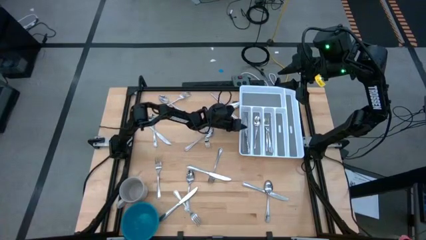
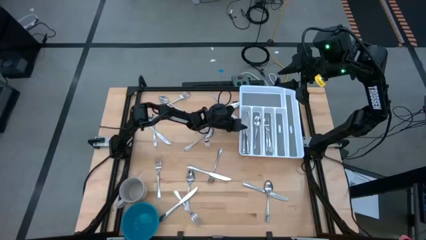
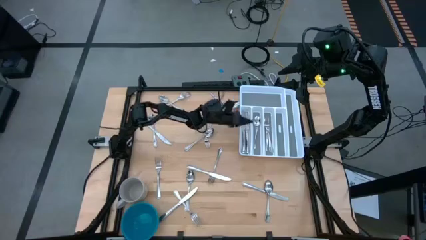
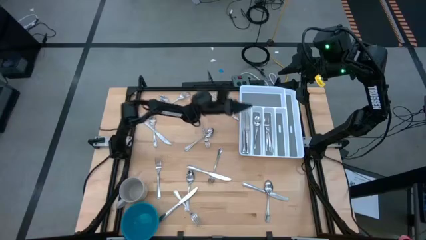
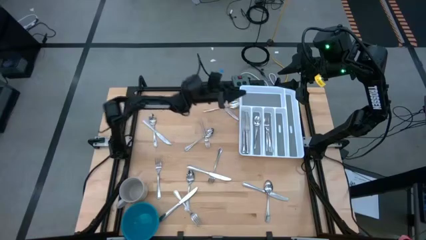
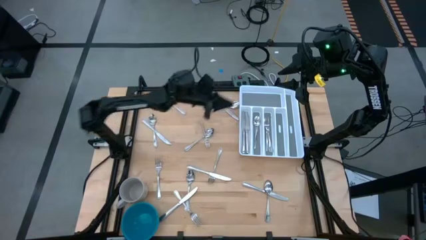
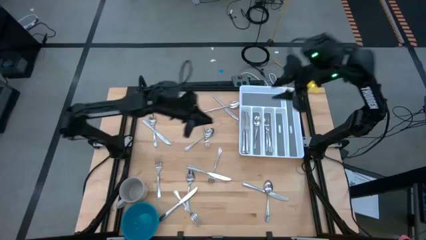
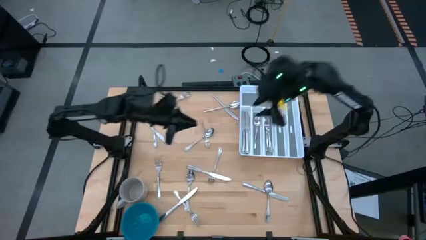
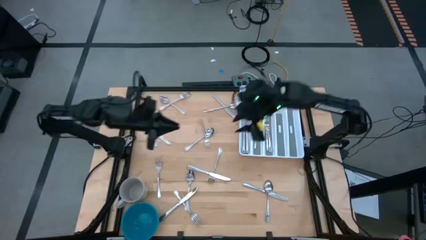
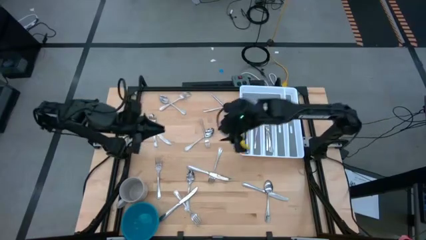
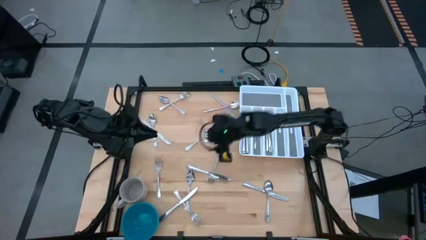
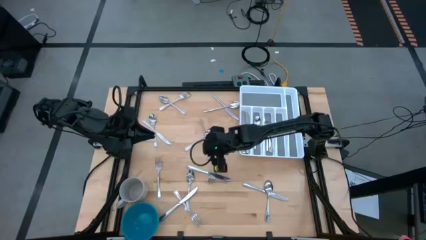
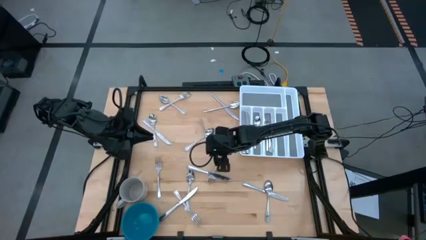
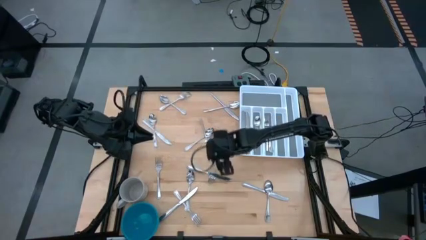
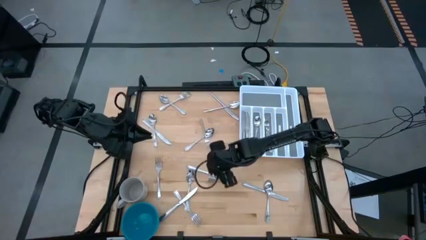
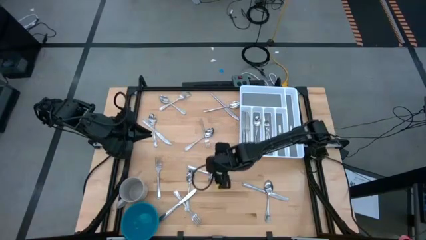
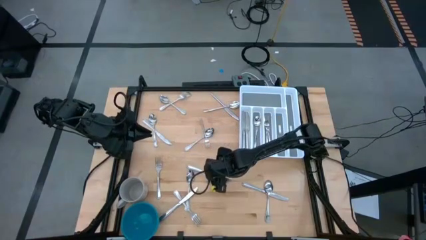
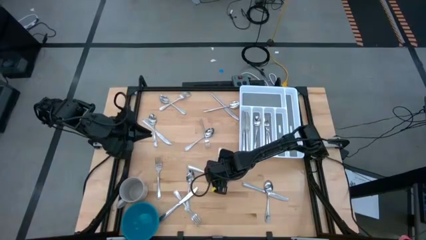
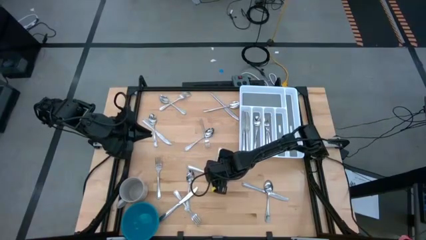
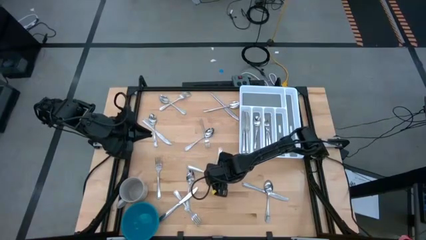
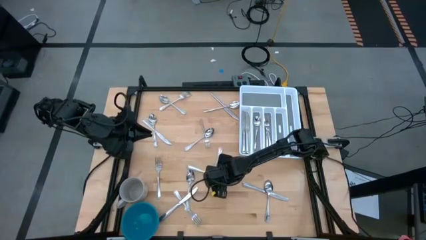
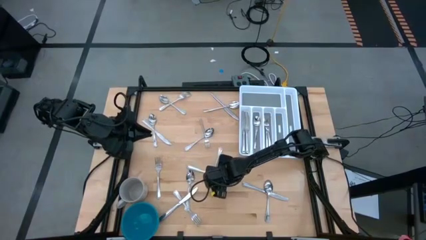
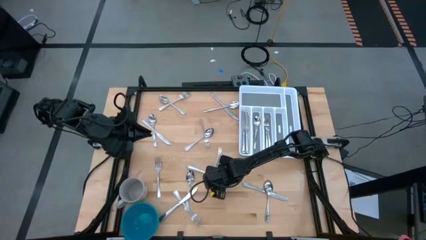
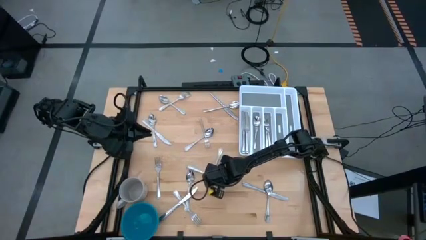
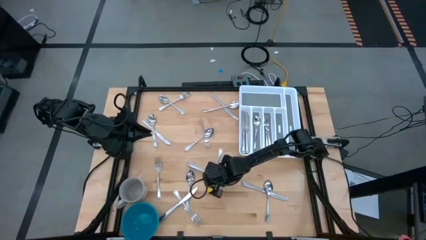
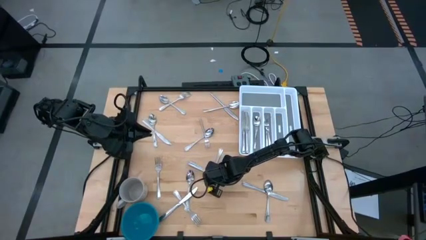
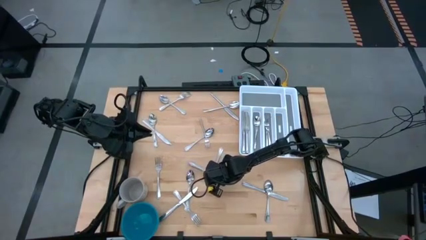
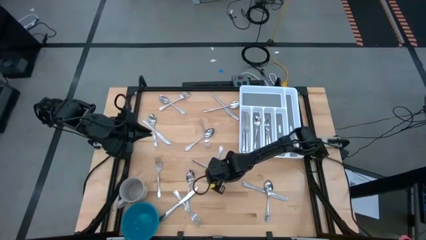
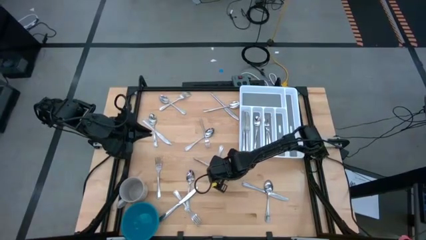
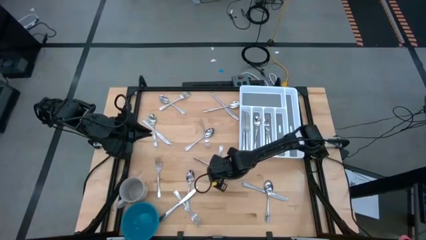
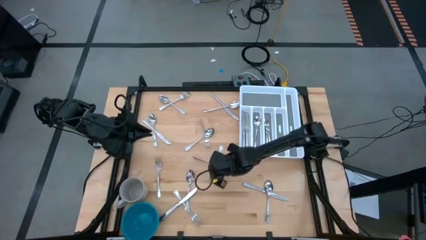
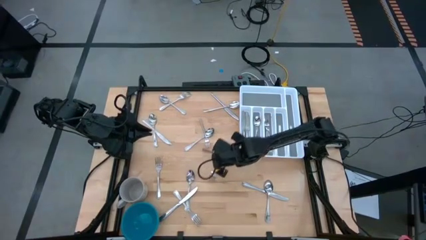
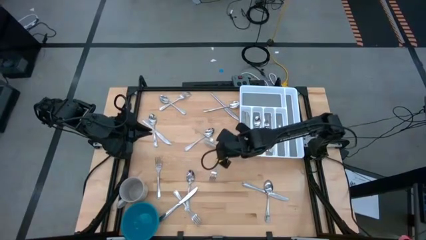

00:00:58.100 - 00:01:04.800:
Task: Sort silverware
Put the table knife into the silverware tray

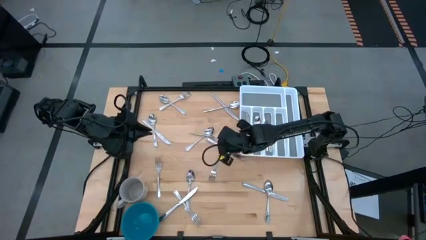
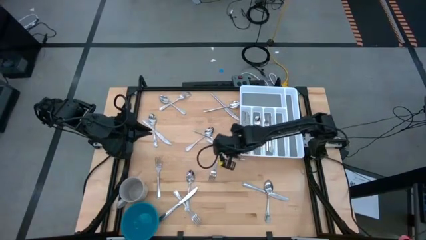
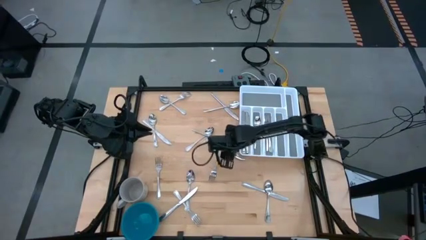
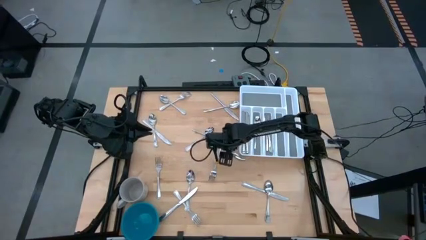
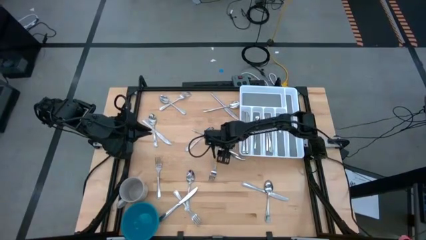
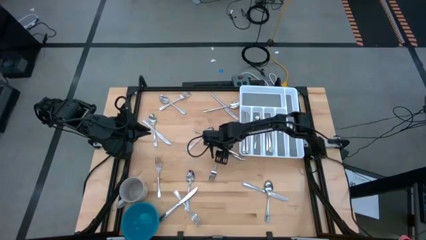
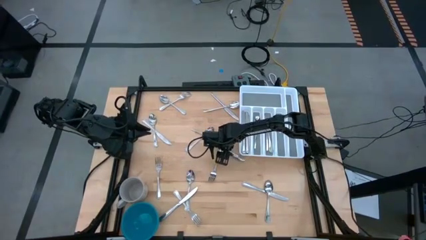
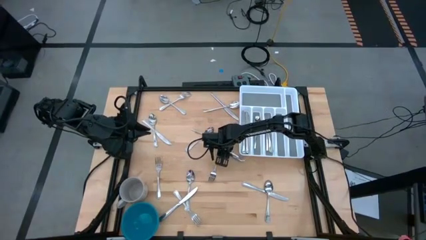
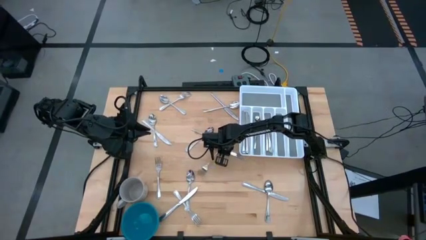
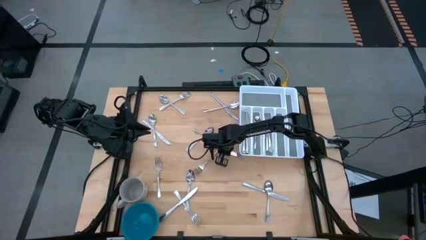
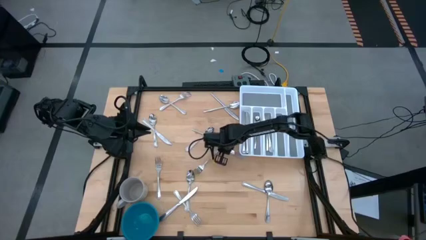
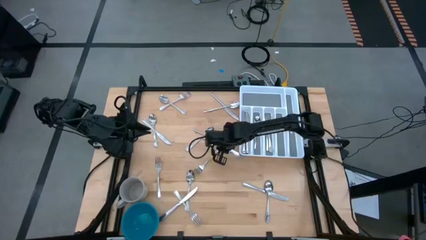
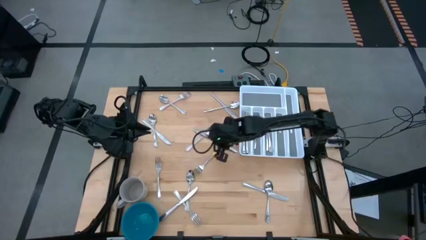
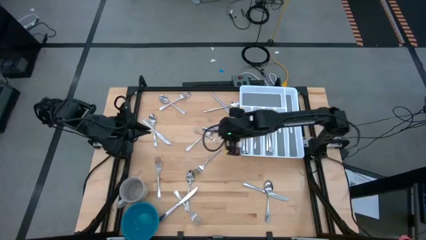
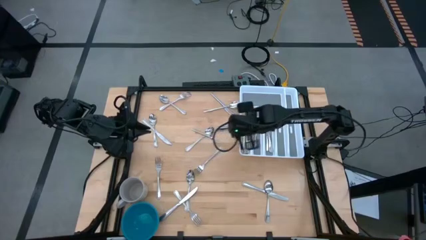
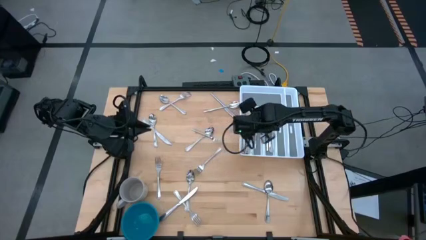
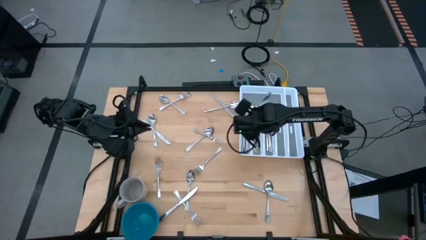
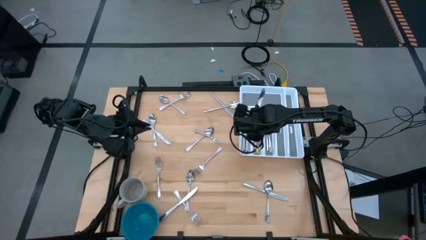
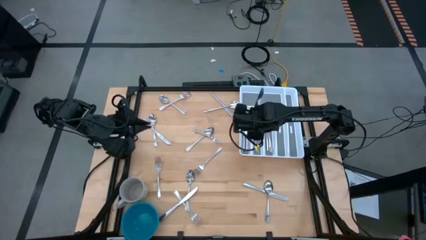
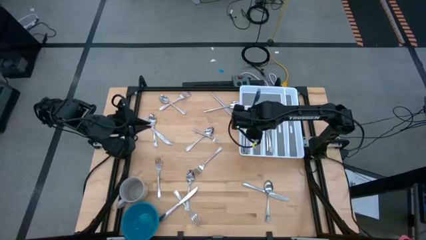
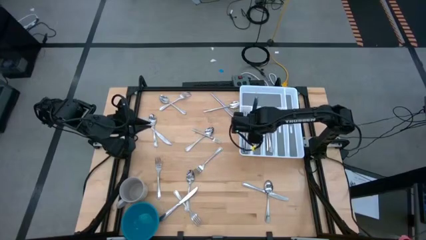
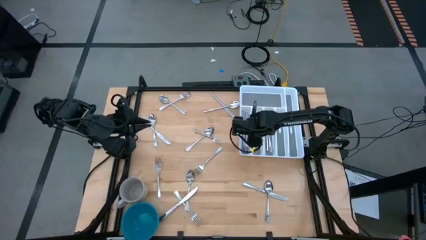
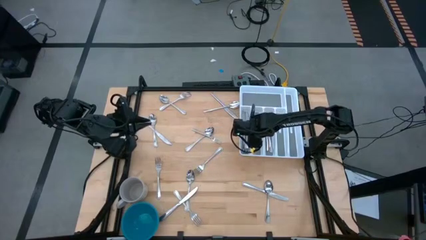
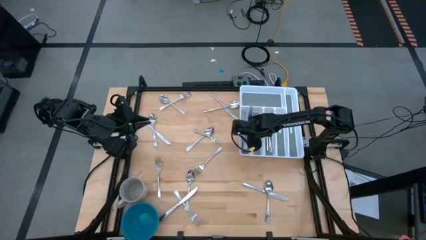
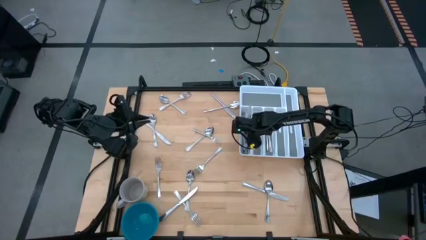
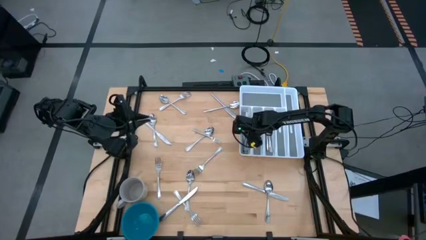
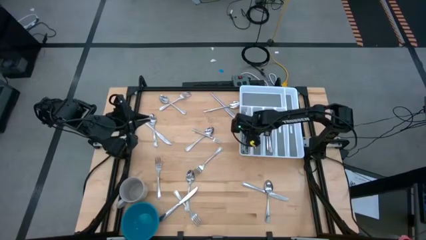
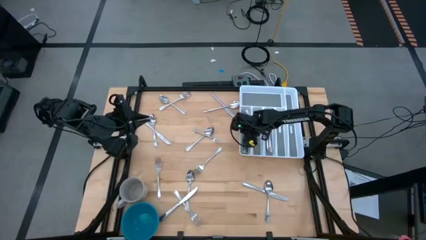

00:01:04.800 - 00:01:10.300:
Put the table knife into the silverware tray

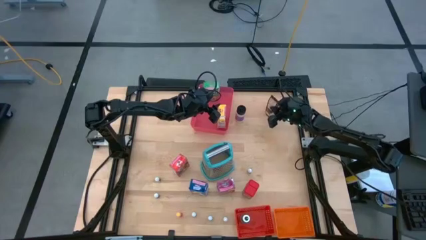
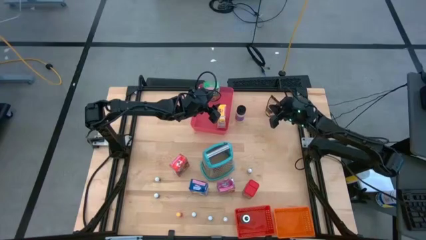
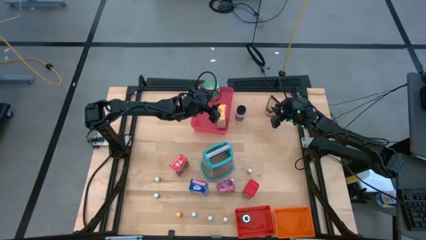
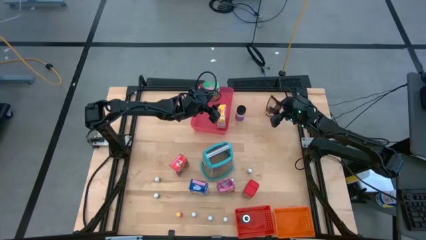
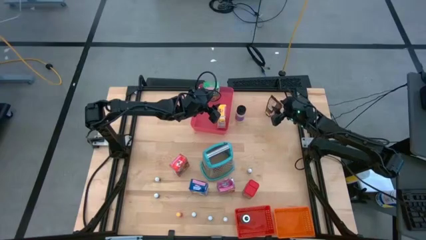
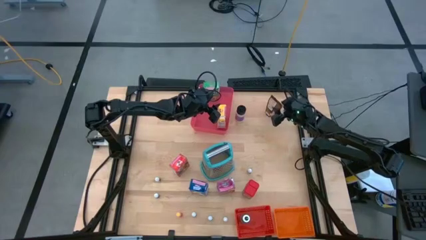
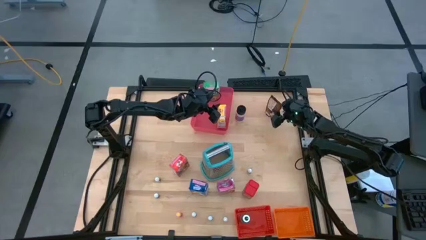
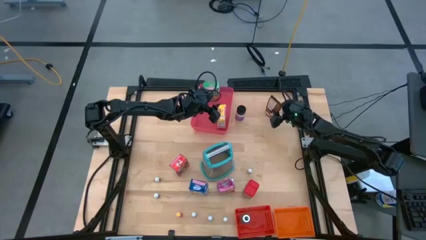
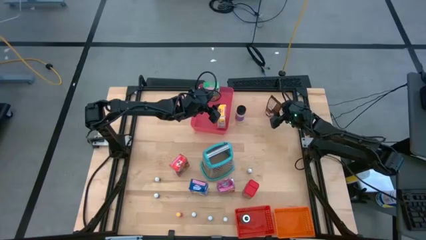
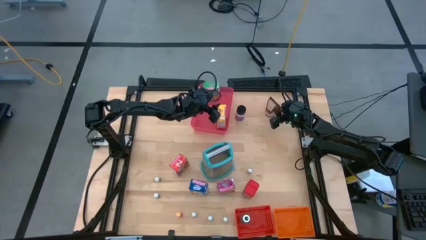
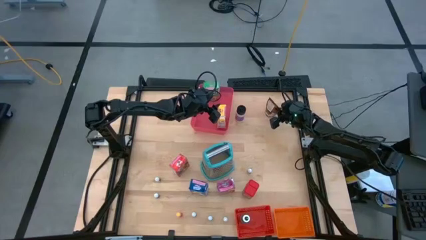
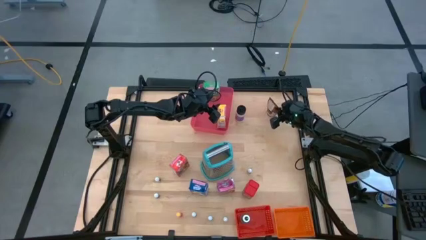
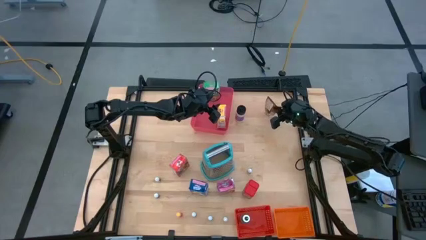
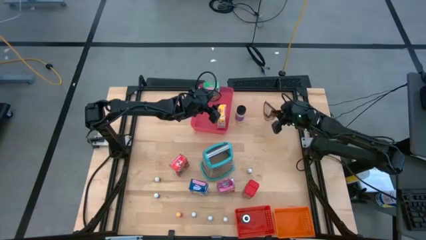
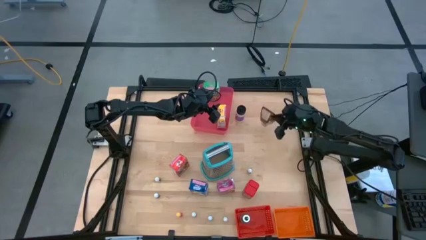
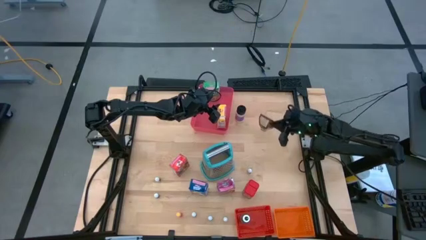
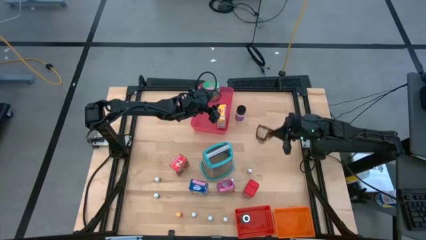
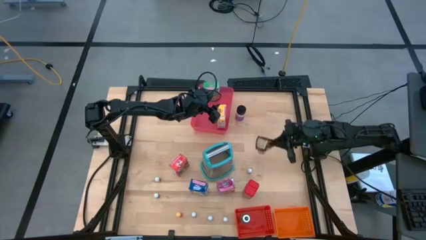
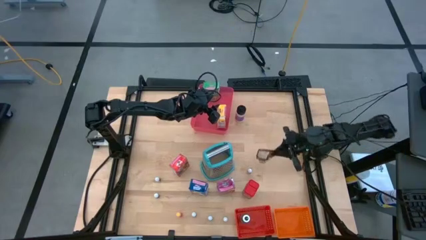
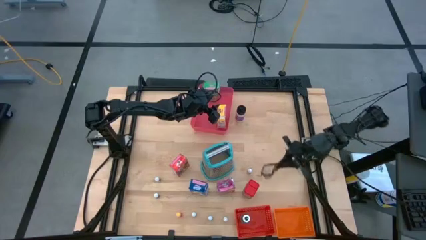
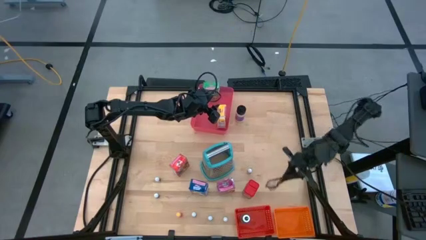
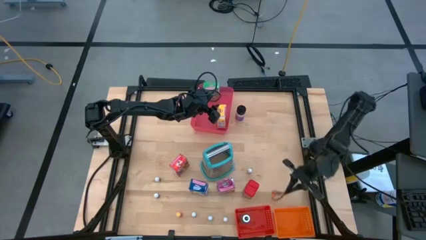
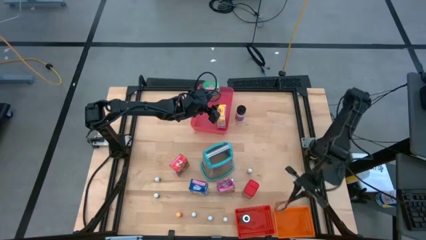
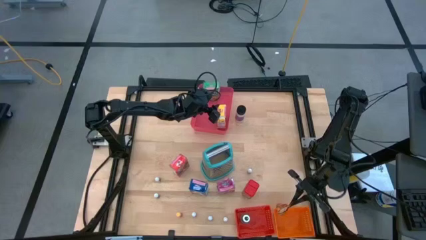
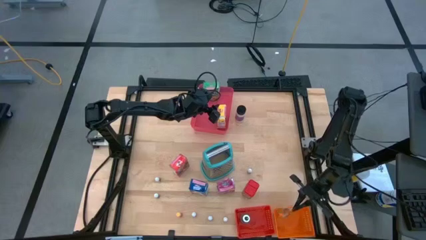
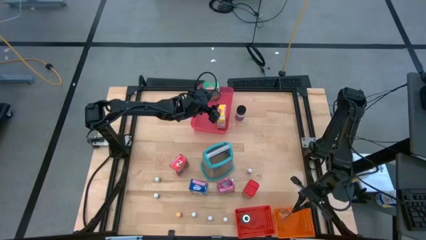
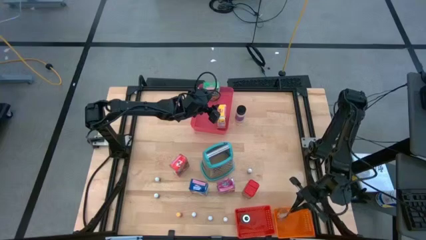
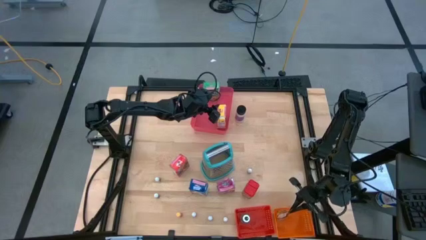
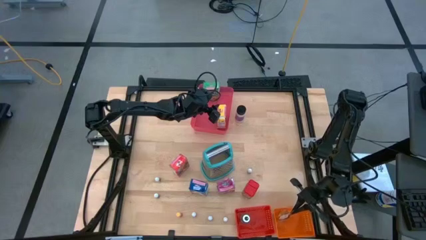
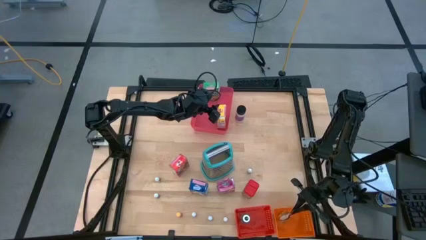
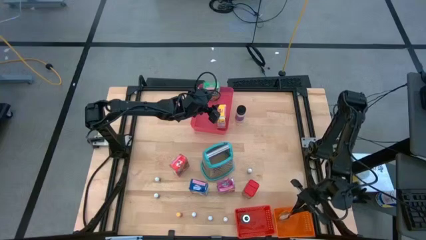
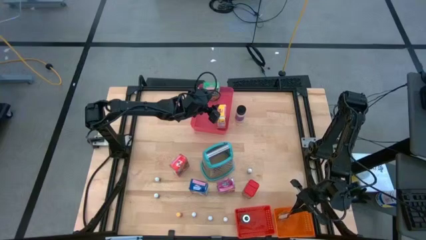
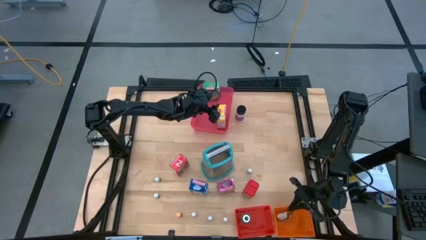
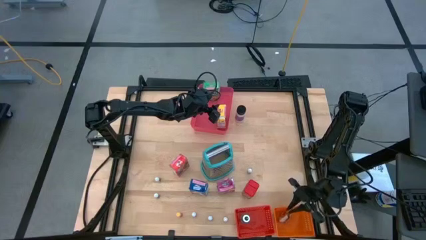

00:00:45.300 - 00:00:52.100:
Task: Pick & Place Kitchen Items
Put the orange seasoning pack into the orange bin
